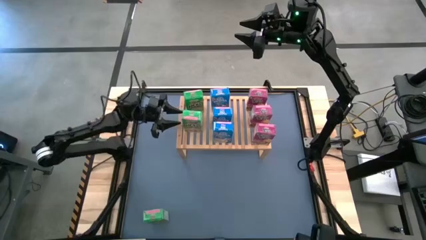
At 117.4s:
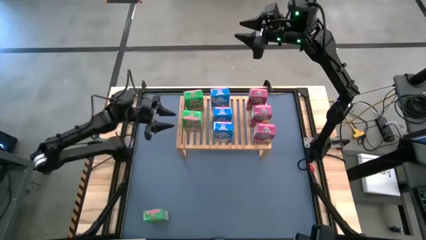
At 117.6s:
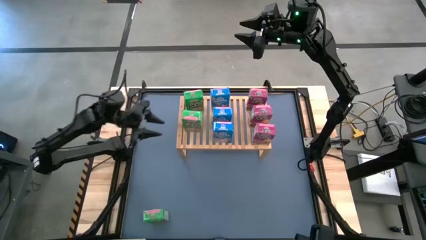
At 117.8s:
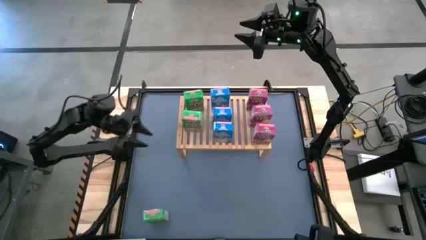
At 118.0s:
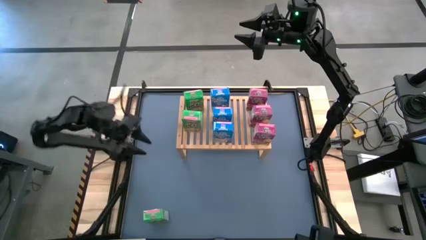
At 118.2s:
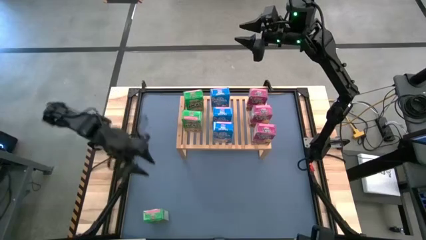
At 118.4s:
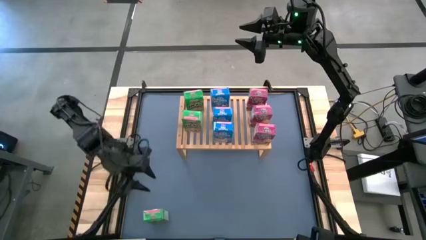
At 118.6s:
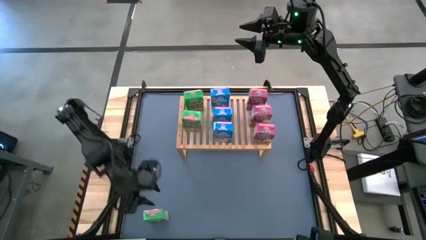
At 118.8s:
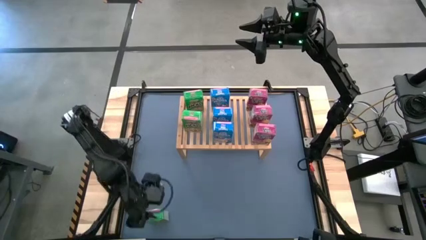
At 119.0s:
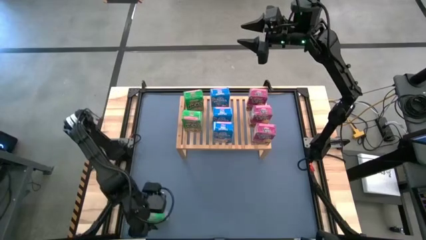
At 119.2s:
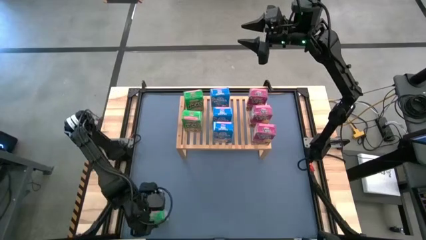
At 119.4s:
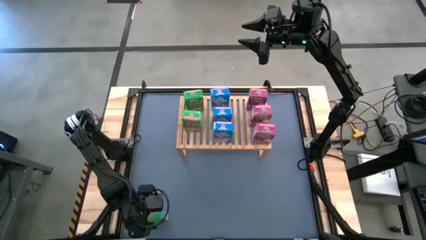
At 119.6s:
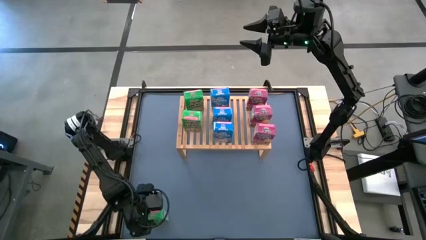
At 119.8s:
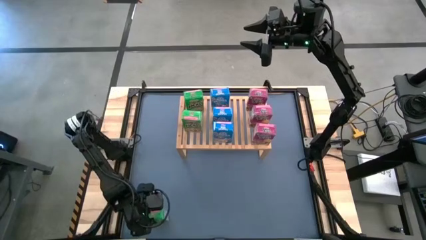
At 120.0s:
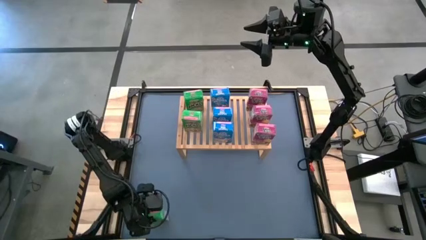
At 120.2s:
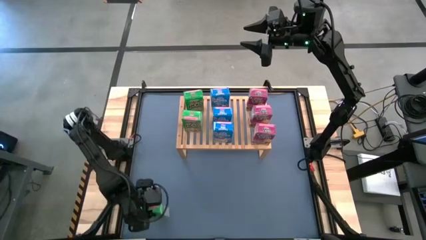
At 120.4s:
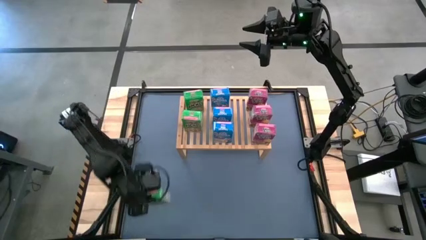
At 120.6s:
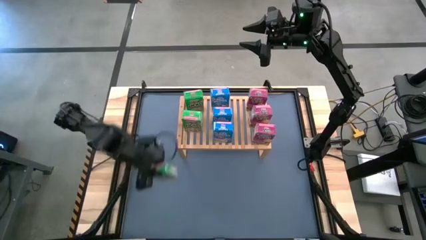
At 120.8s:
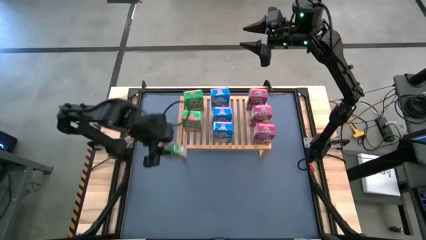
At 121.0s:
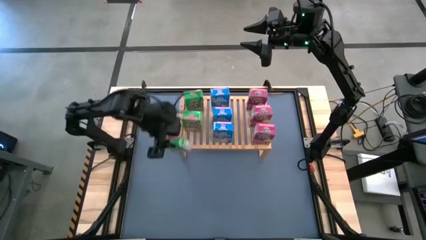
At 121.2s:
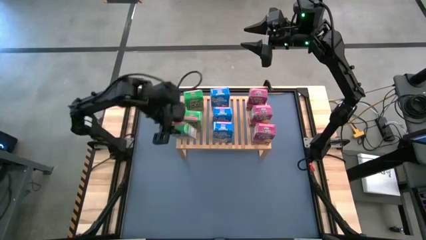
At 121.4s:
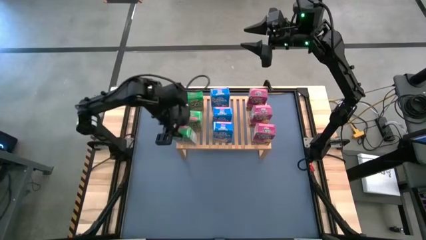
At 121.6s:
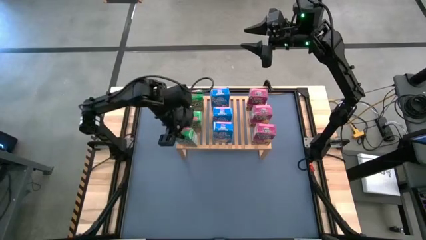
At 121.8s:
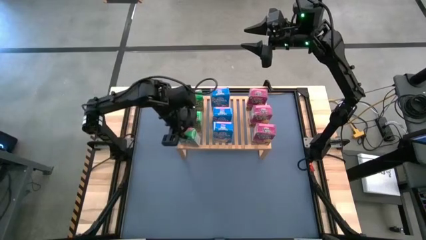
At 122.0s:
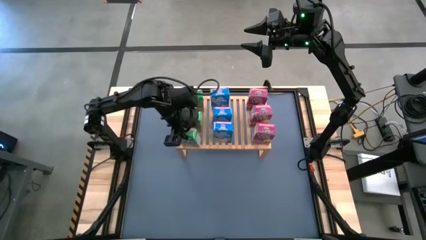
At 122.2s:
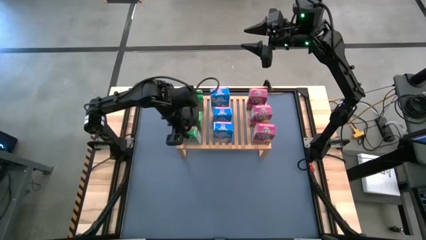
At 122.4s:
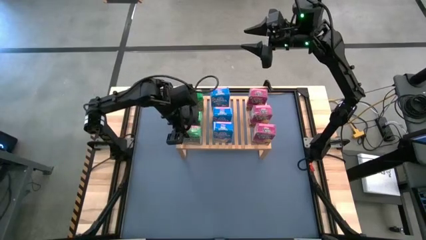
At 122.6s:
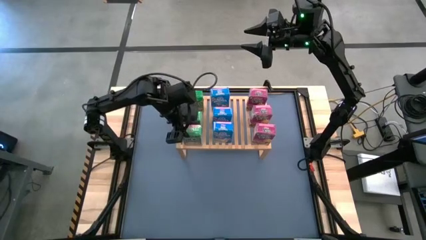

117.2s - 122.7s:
Task: Stack cereal on shelf
Put the green cereal box on the shelf

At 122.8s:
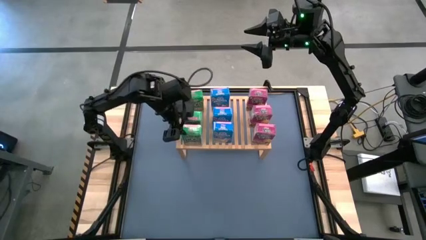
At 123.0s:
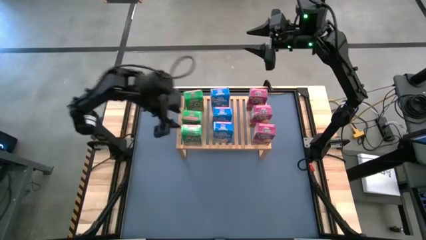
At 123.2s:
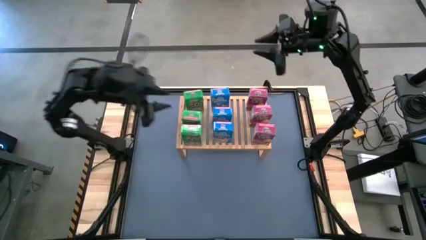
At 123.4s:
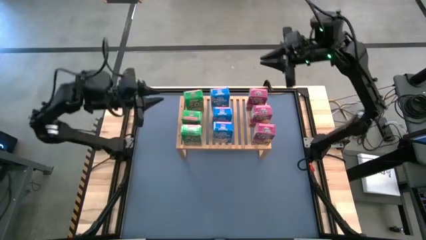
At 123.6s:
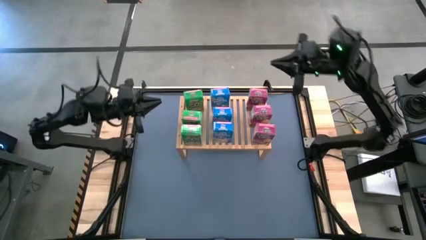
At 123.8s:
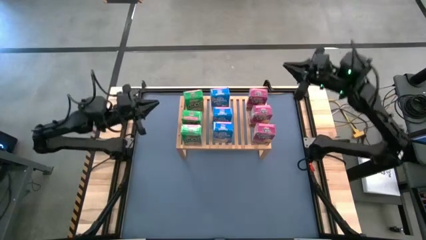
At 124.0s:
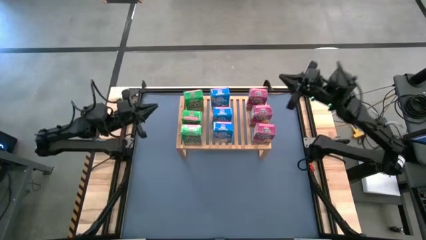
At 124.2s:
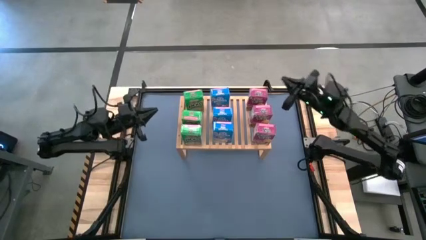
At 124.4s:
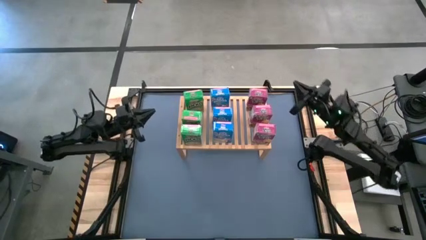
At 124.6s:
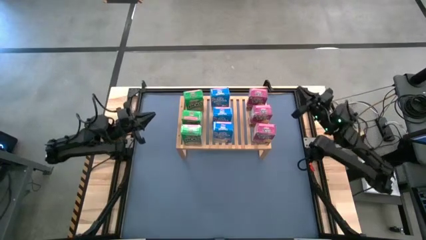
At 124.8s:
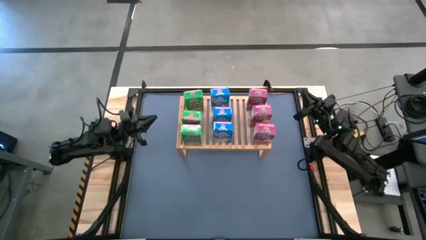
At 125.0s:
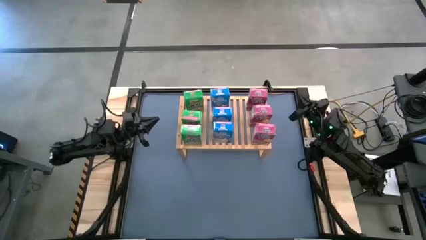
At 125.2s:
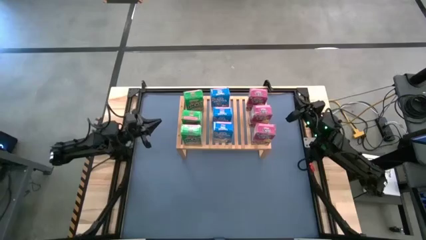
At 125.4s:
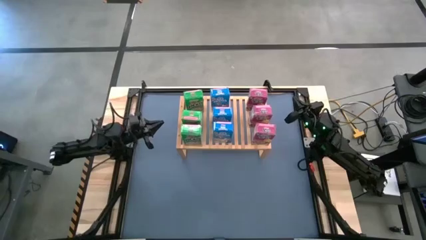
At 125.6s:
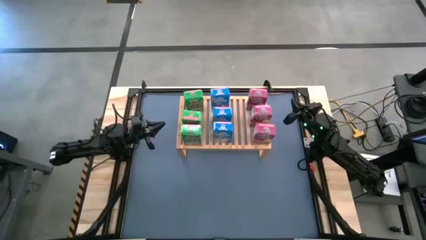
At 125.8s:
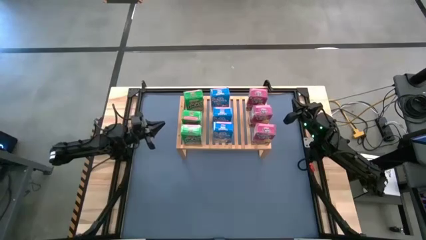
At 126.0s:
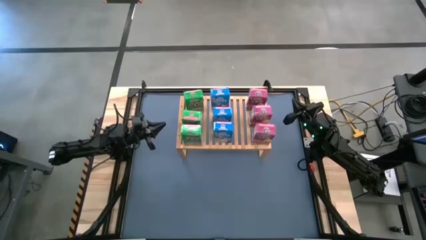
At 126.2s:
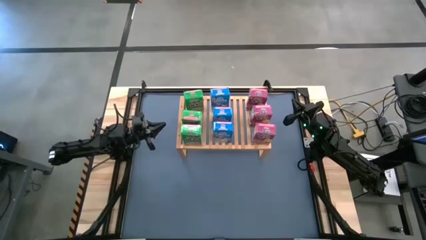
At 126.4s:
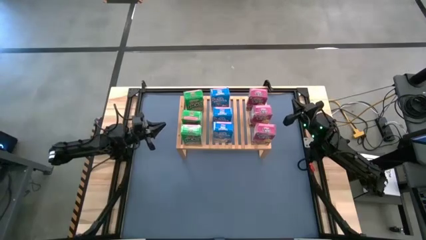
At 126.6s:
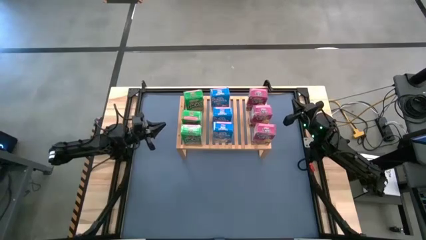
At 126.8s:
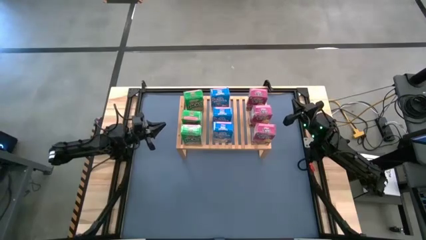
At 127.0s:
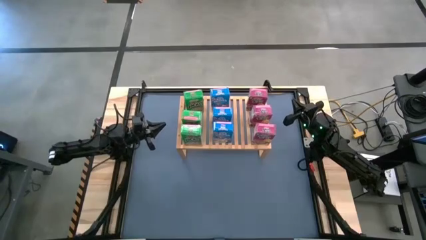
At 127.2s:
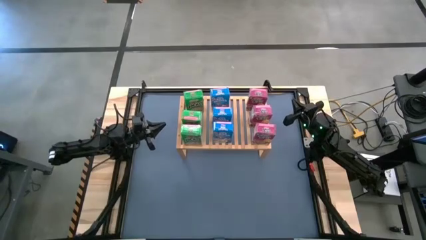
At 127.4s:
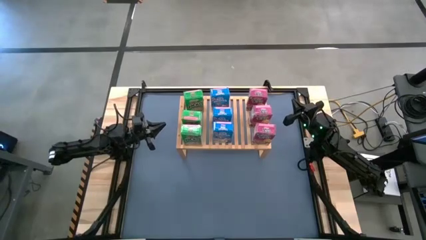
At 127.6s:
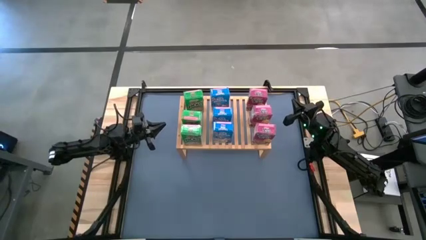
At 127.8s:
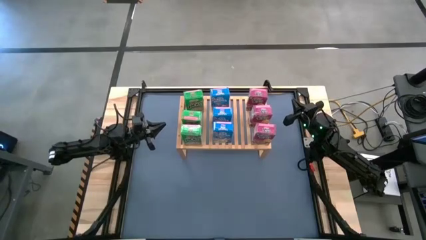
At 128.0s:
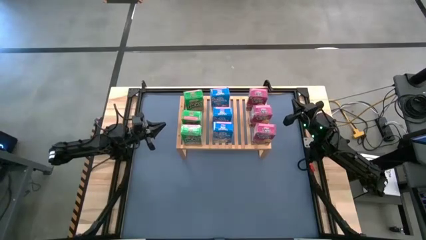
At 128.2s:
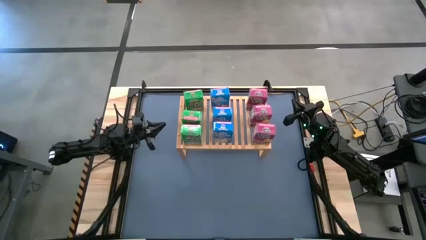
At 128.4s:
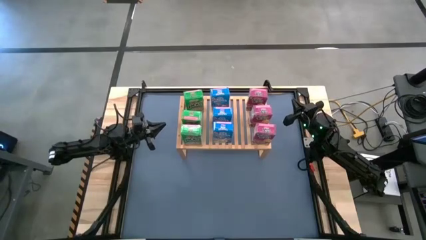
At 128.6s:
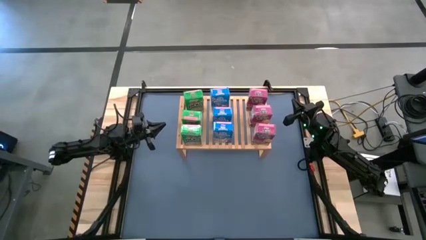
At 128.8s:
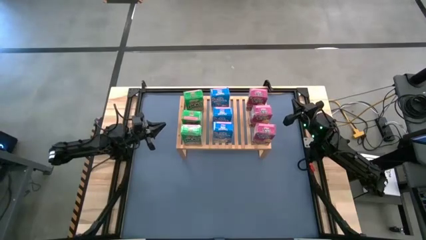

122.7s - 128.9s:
Return to Home Position

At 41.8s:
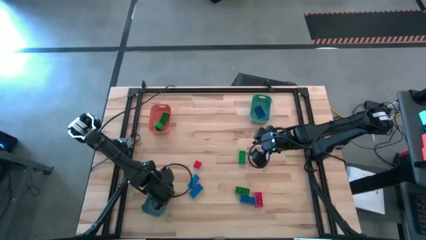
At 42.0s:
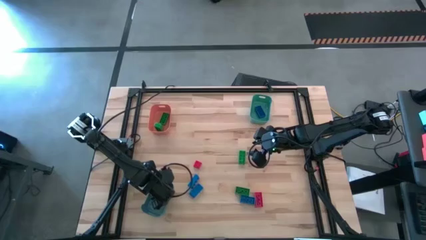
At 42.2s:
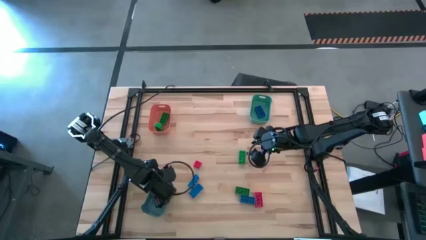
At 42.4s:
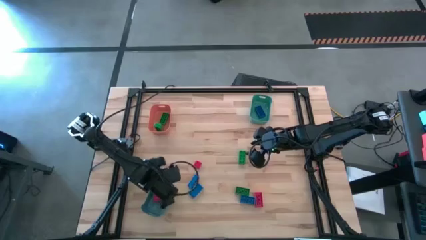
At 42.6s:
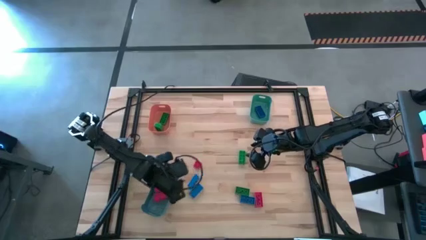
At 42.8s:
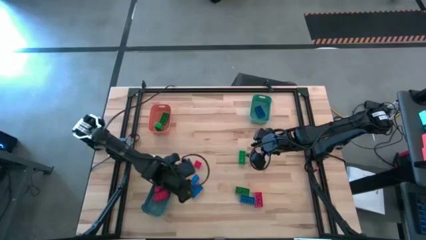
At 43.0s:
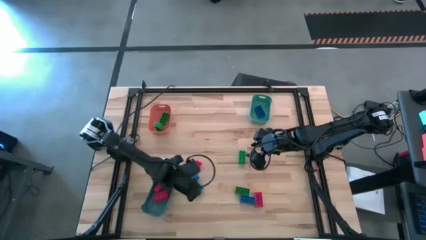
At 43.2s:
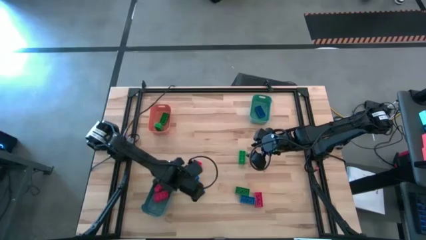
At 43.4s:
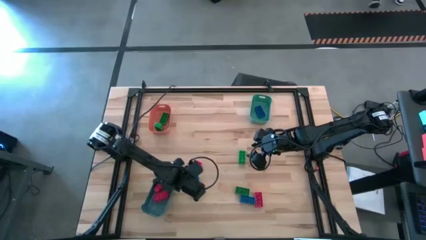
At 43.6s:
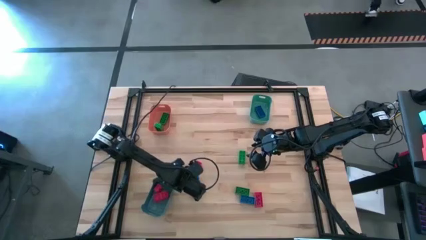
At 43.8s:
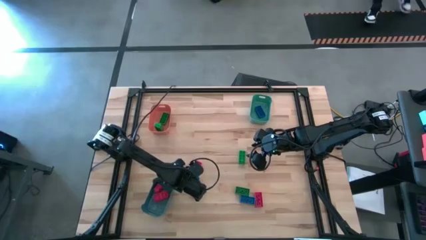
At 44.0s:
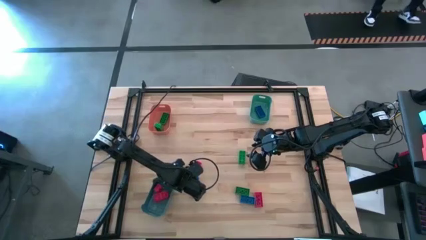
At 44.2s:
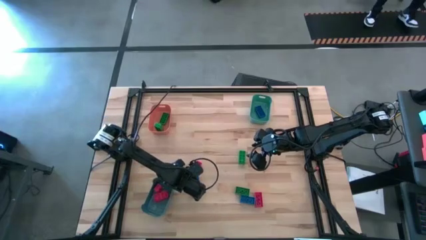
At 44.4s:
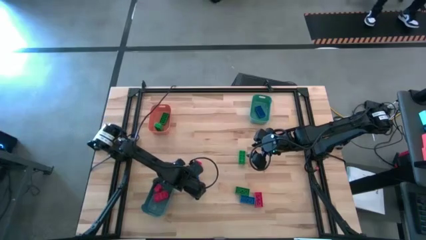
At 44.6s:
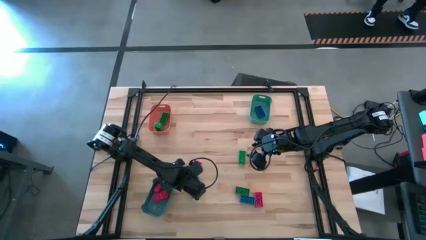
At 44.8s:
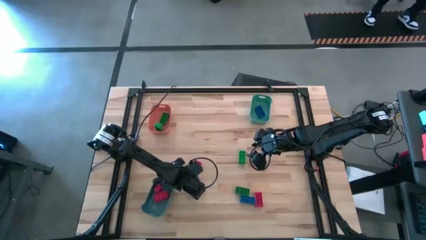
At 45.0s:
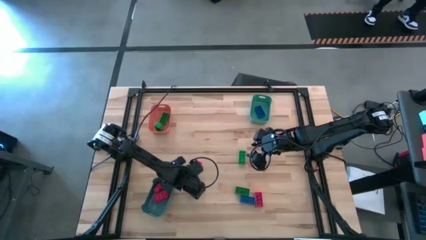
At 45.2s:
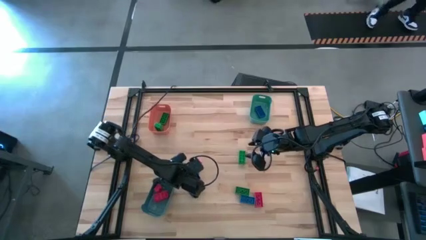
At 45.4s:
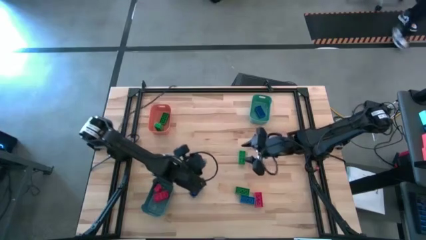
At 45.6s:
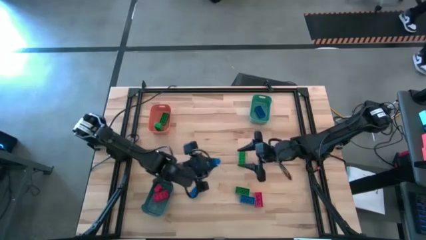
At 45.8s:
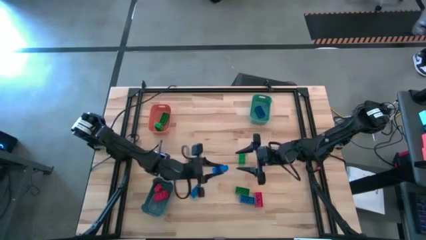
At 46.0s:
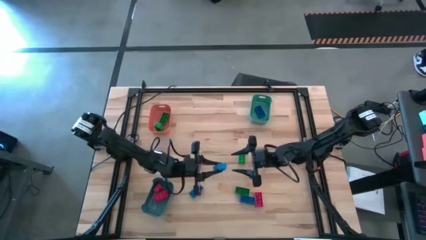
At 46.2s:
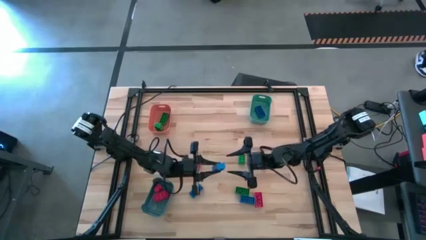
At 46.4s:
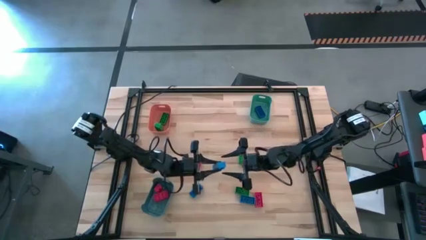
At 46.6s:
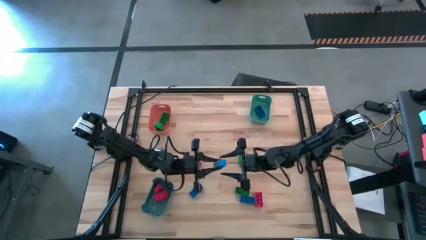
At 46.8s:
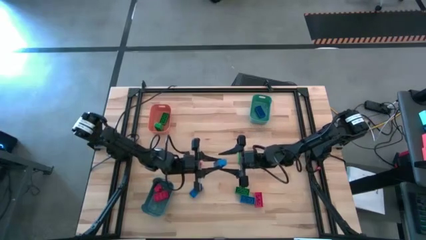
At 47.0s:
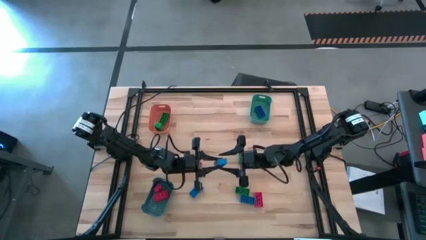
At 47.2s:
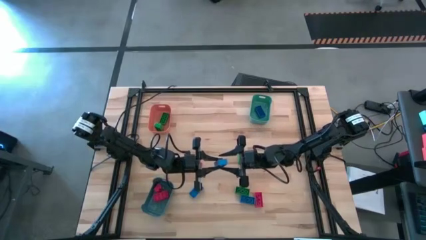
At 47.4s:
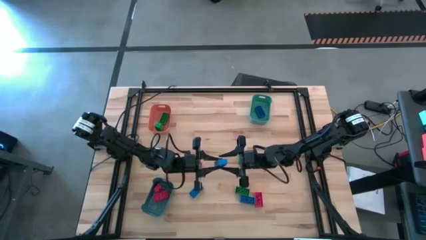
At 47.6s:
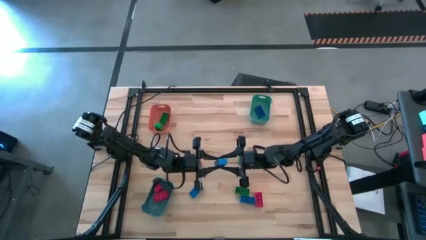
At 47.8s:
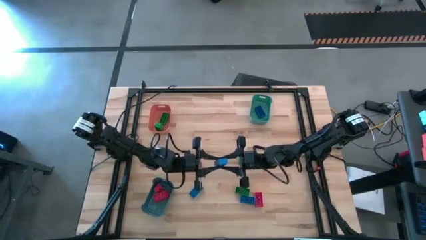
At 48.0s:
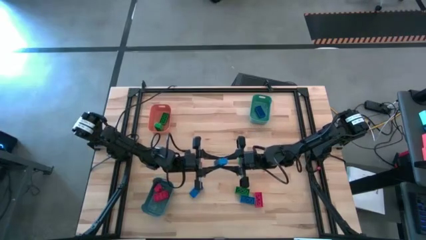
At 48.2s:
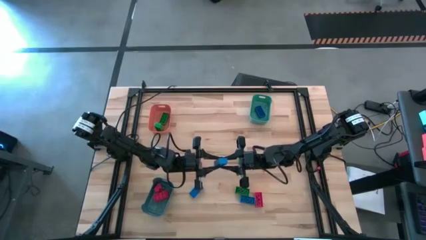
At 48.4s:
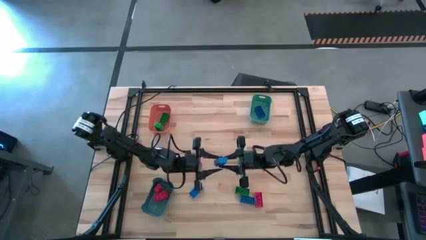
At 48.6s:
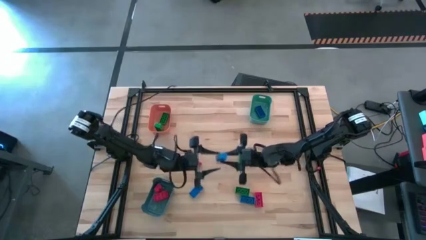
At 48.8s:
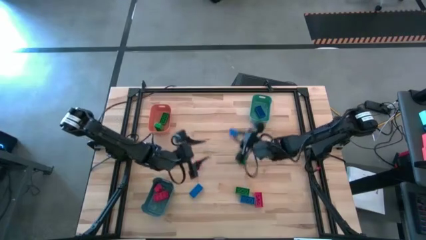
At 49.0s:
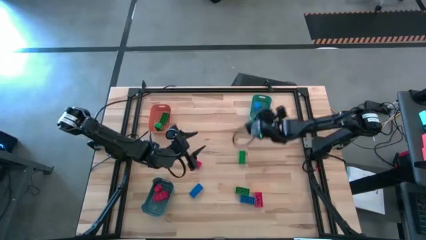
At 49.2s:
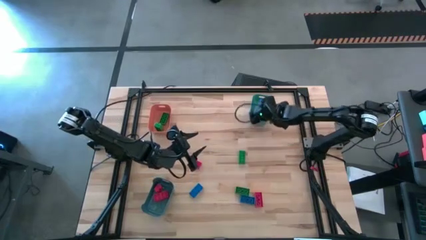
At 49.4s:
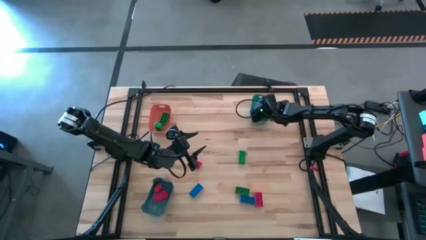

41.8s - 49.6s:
Task: Sort & place blocks by color
Put the blue game piece into the green bin
